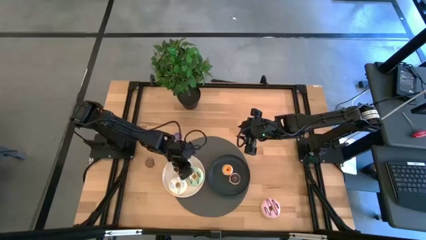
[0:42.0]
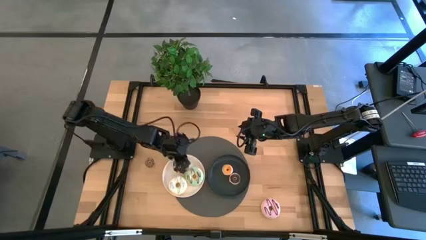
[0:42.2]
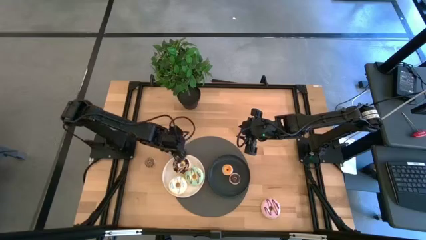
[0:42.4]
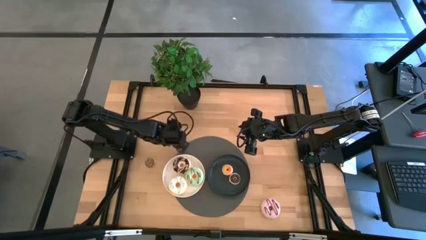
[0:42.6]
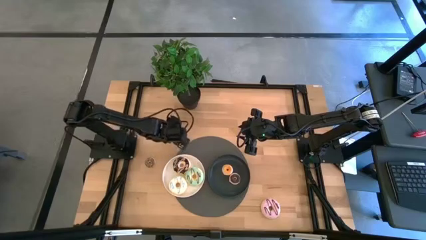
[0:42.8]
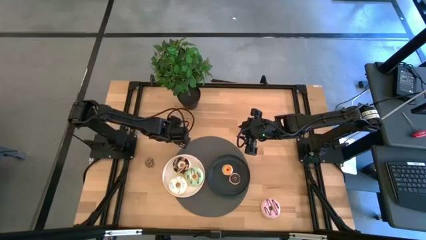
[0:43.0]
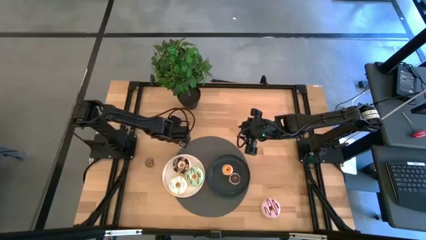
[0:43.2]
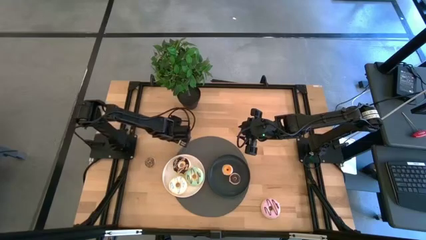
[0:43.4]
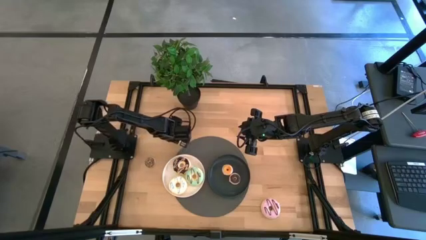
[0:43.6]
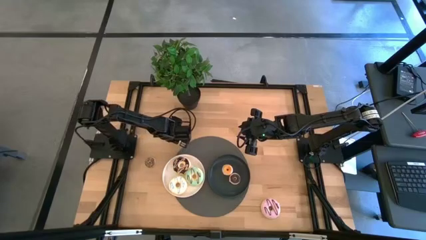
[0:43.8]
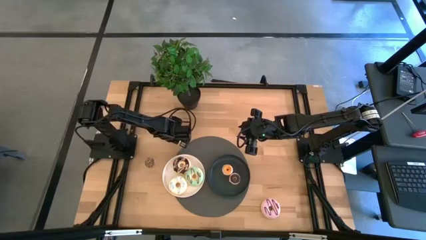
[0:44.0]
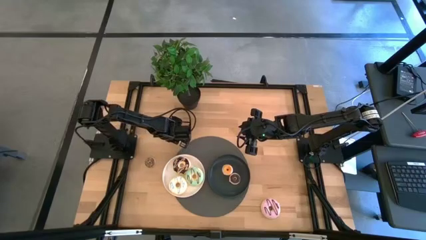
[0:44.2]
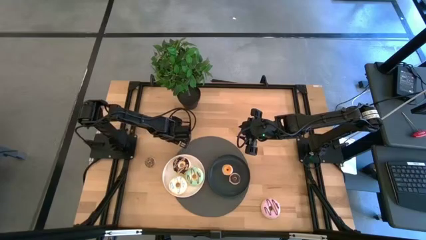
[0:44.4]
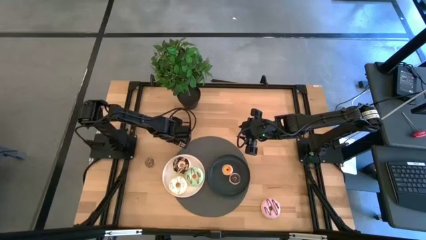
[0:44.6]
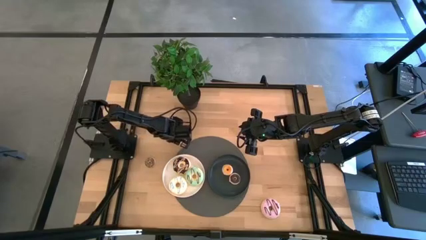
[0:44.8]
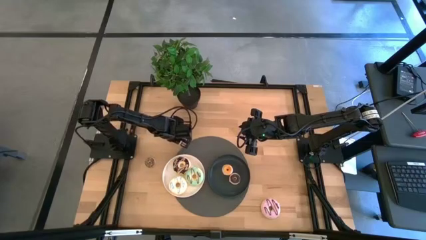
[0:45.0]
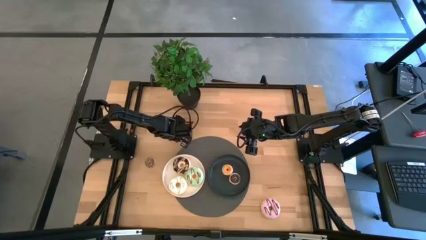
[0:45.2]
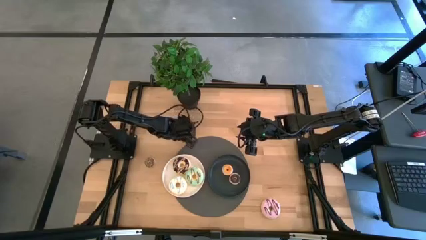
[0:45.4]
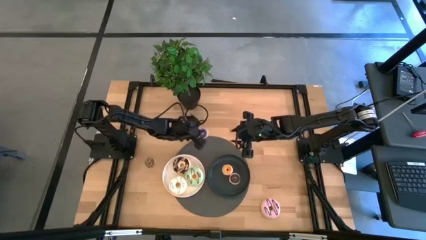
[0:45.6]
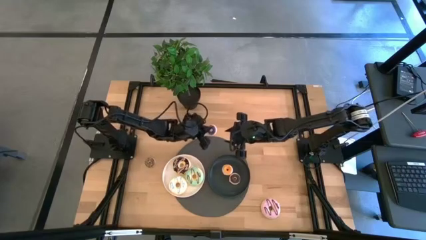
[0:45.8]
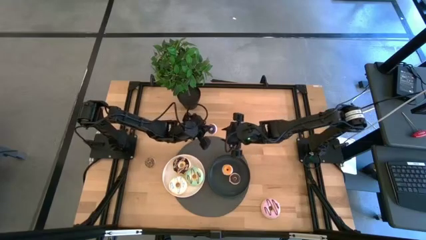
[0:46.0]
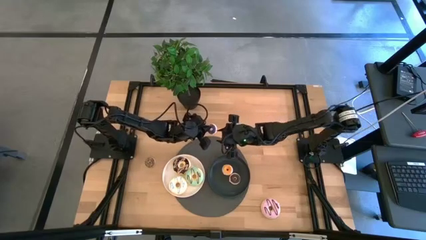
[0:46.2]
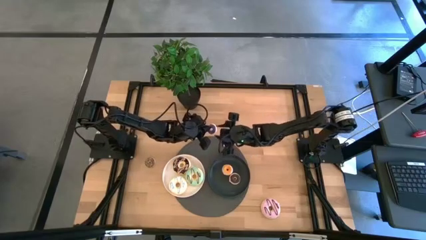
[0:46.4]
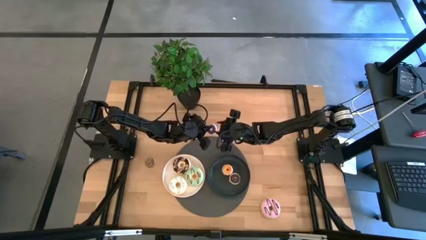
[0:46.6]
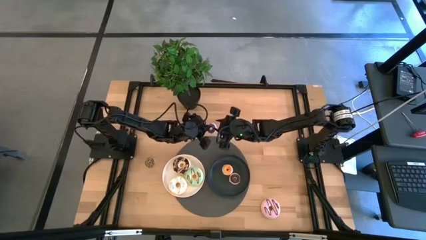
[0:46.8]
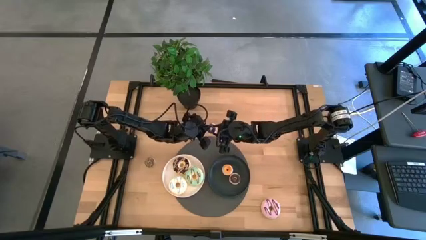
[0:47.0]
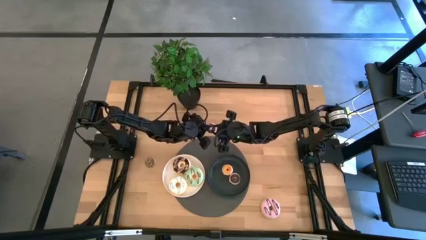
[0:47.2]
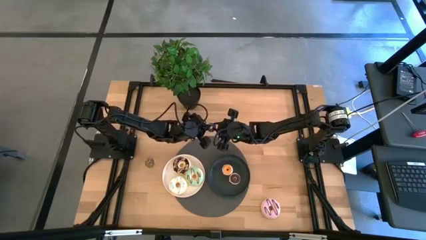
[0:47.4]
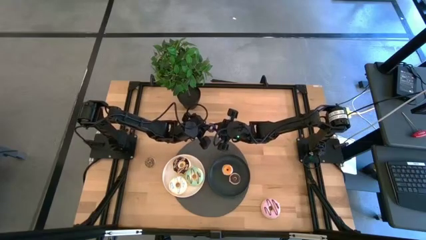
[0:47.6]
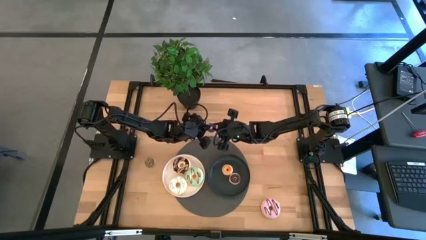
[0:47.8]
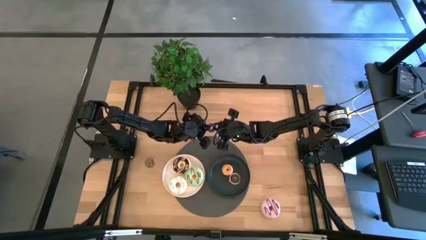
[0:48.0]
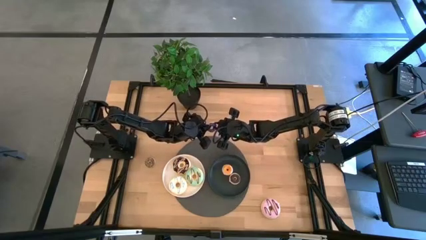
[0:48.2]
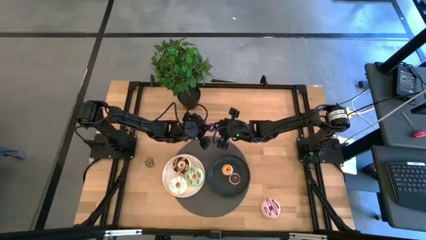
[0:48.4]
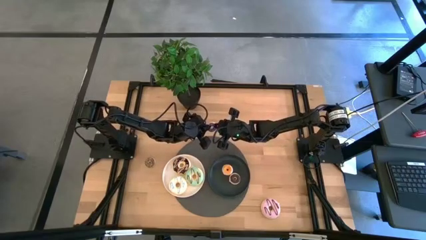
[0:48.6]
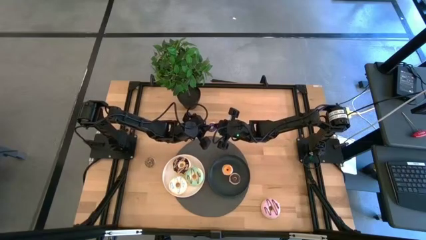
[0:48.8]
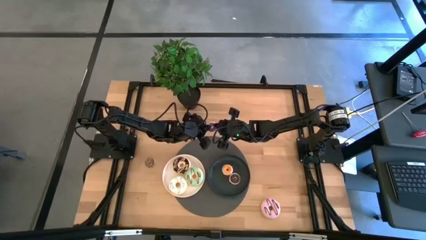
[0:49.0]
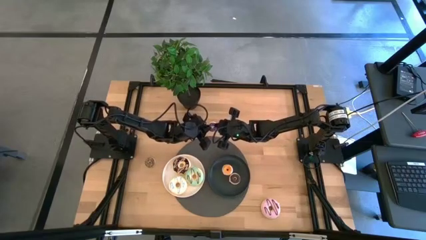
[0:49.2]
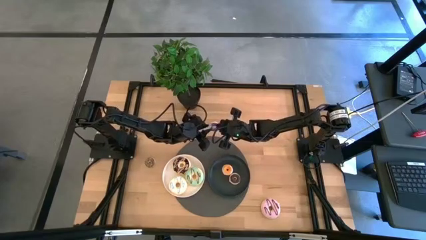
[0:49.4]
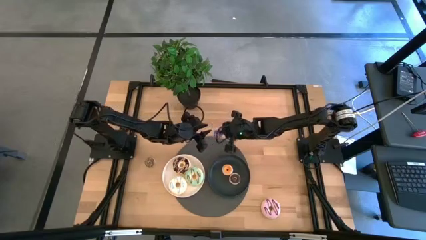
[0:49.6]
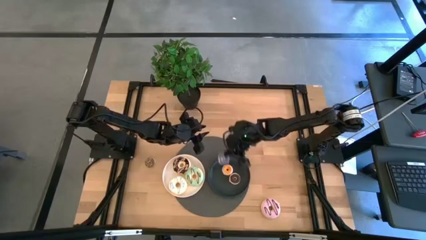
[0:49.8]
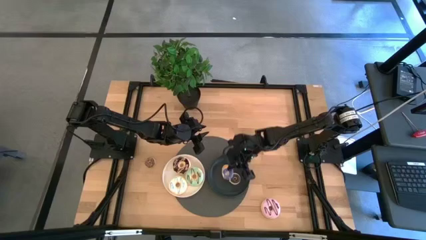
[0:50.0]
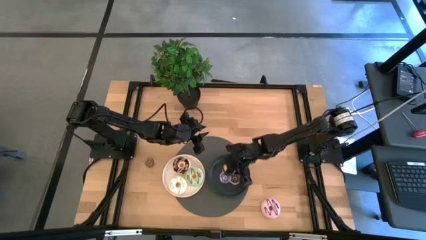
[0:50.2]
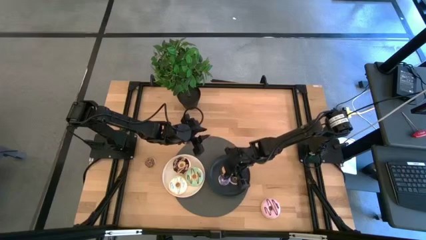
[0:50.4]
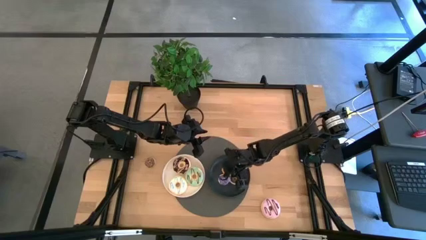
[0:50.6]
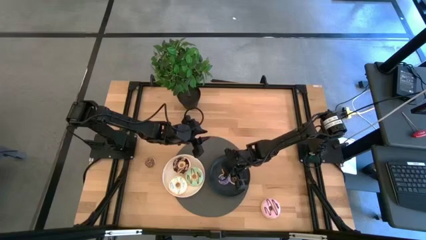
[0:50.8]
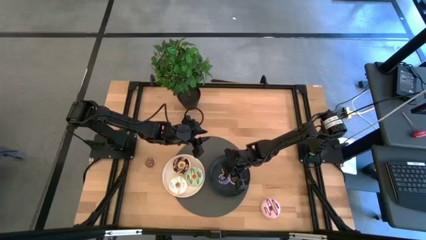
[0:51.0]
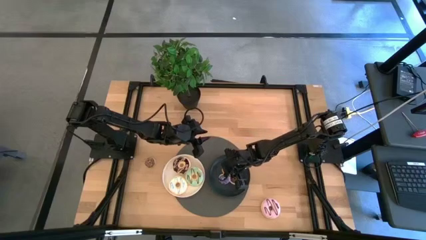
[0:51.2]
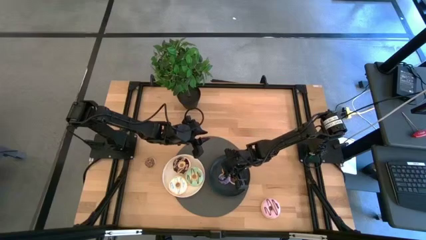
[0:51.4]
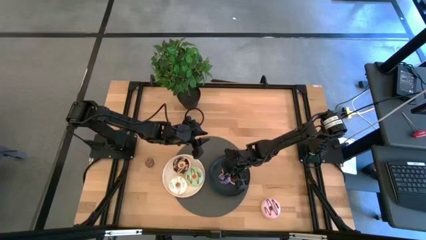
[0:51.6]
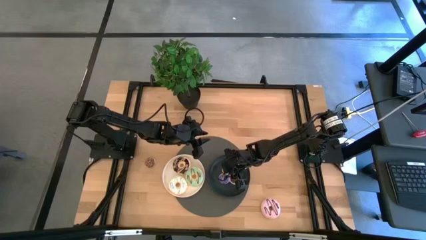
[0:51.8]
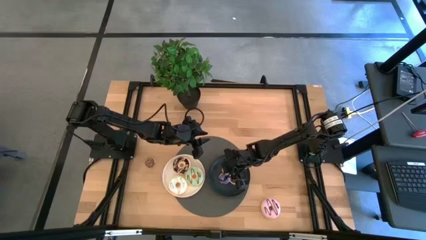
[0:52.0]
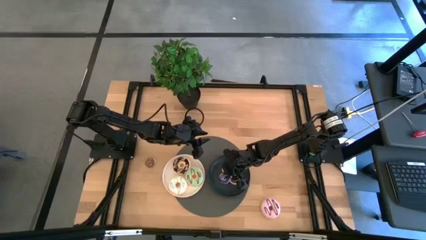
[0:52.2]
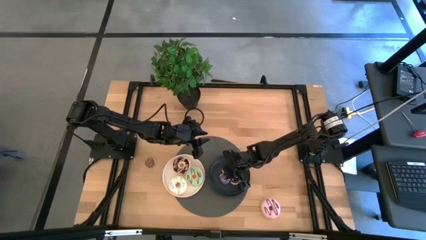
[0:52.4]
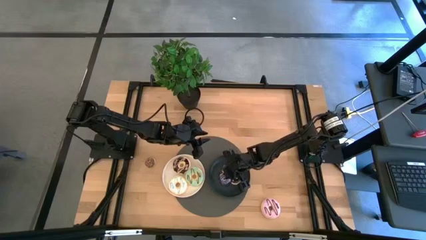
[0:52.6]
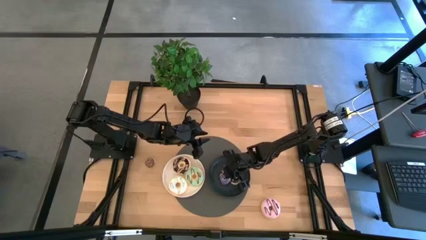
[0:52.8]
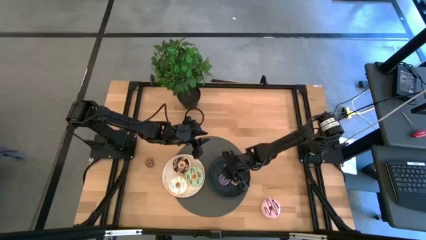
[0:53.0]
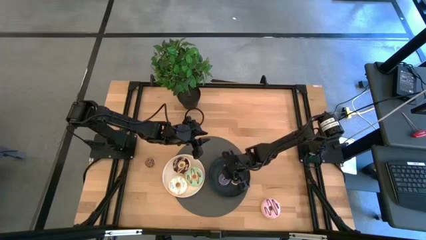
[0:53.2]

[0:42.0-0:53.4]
Task: Pick & Place donuts
Put the small blue donut on the black plate
